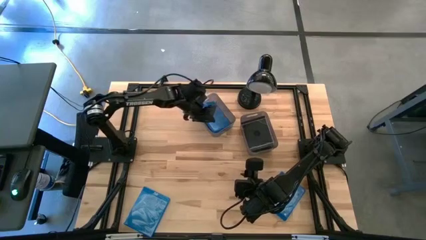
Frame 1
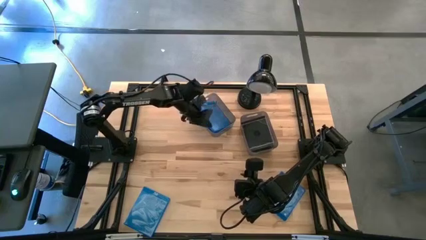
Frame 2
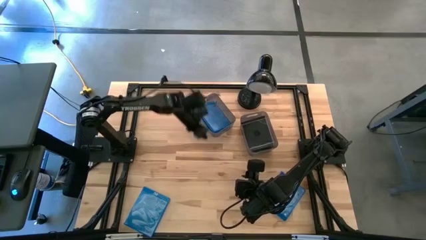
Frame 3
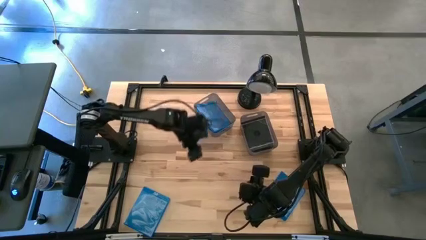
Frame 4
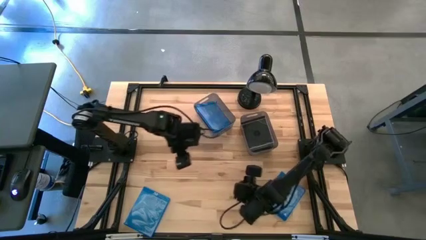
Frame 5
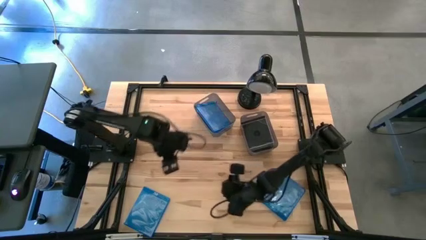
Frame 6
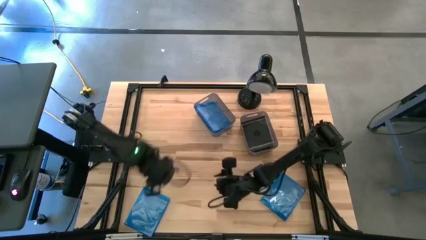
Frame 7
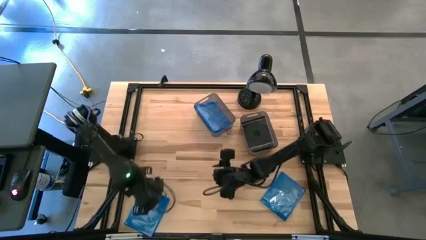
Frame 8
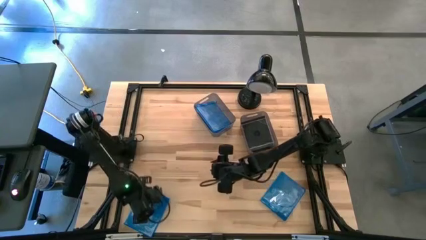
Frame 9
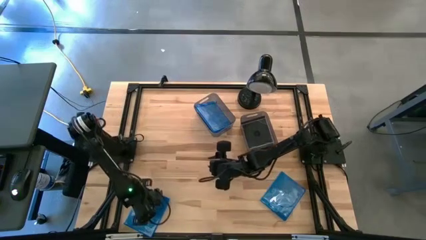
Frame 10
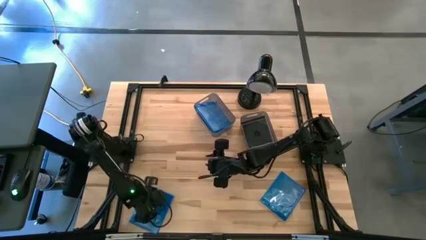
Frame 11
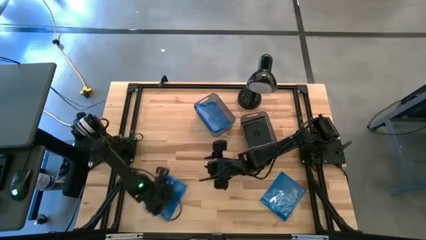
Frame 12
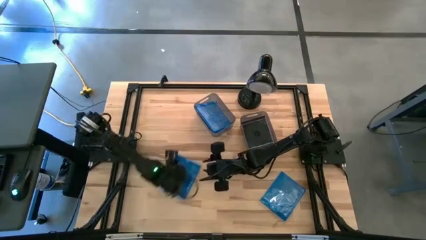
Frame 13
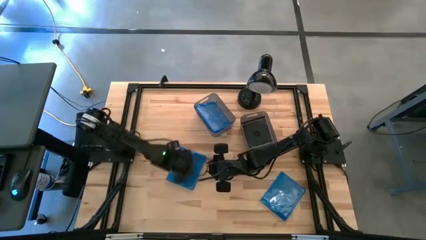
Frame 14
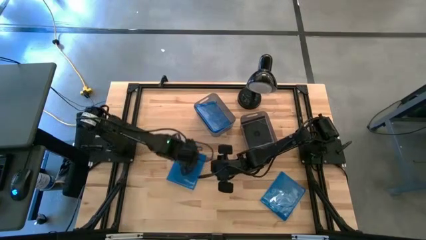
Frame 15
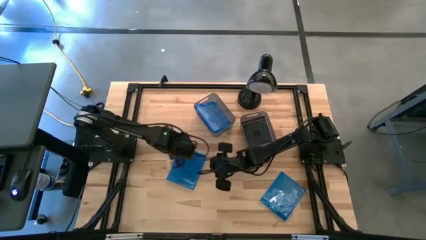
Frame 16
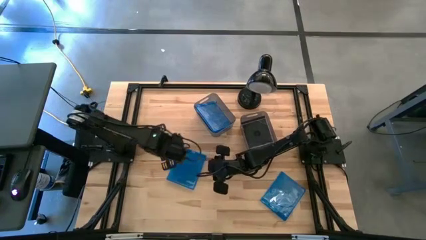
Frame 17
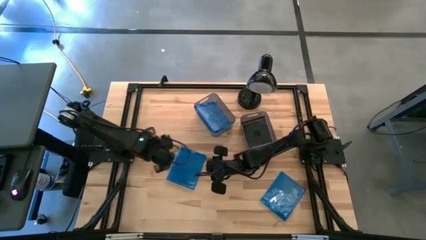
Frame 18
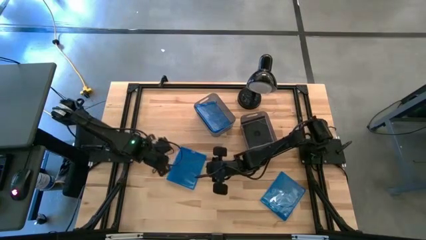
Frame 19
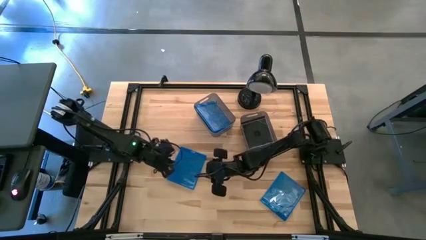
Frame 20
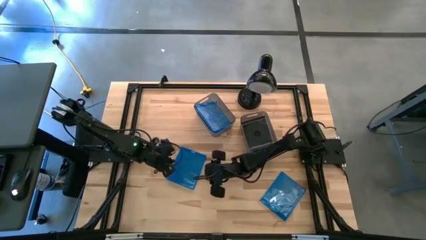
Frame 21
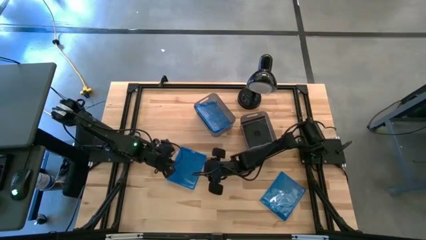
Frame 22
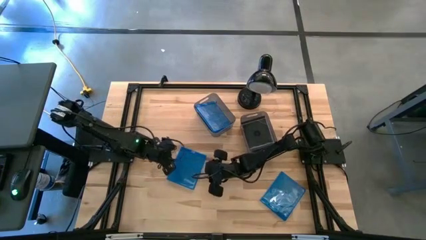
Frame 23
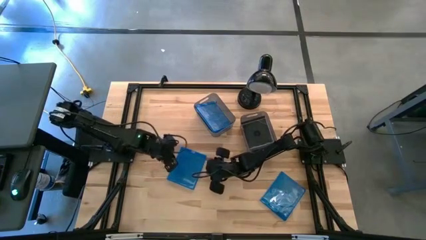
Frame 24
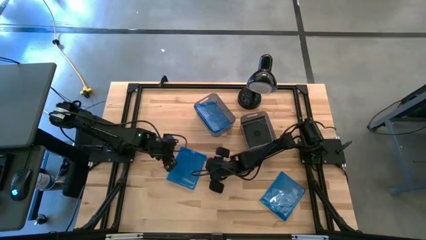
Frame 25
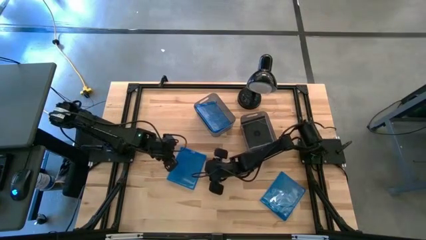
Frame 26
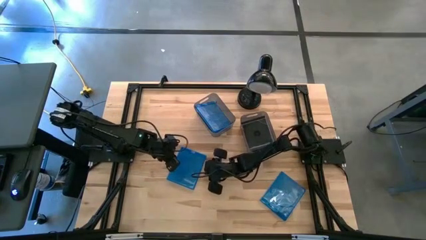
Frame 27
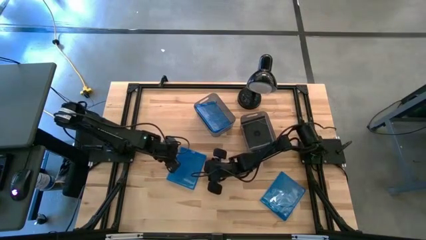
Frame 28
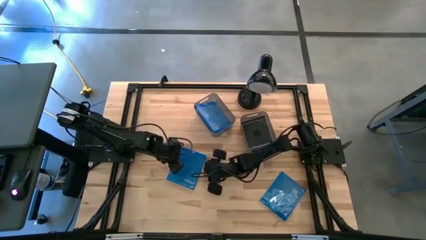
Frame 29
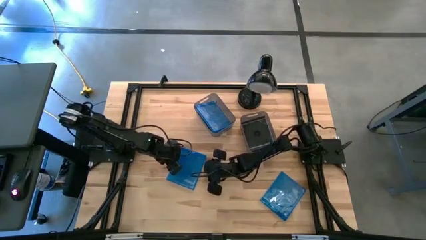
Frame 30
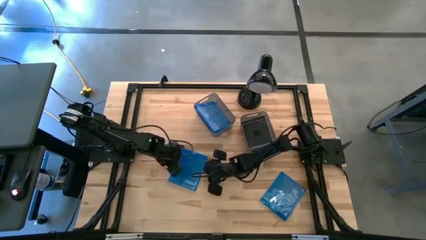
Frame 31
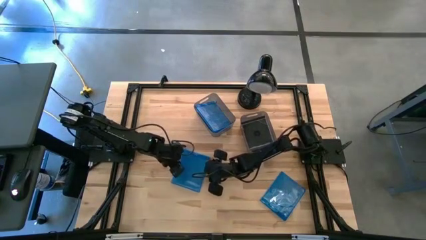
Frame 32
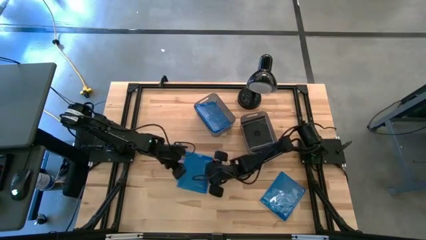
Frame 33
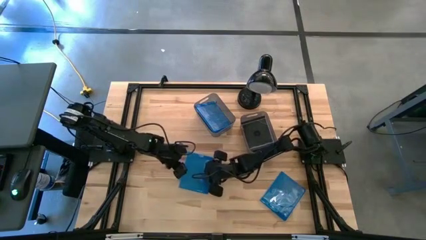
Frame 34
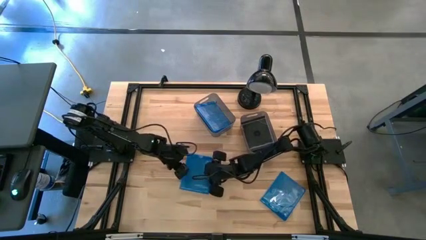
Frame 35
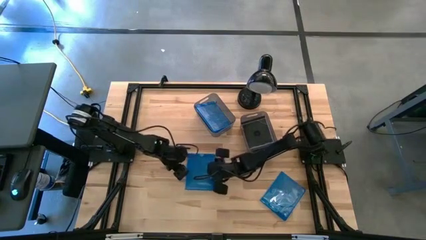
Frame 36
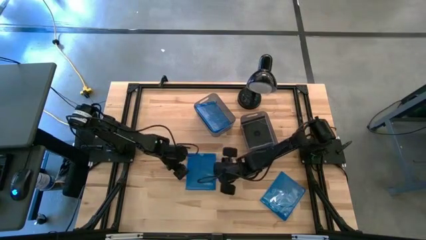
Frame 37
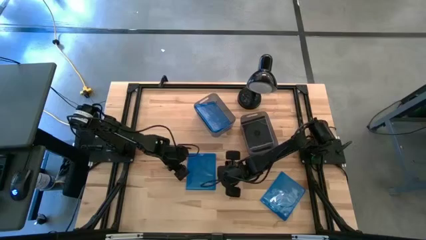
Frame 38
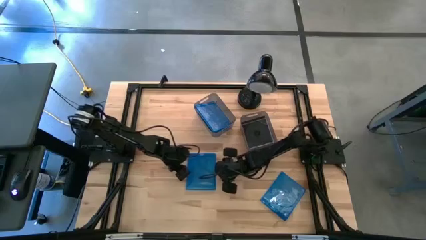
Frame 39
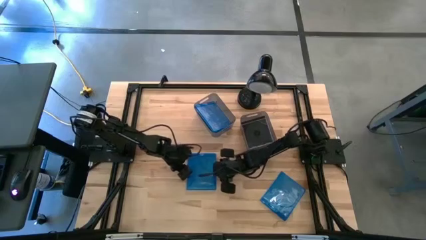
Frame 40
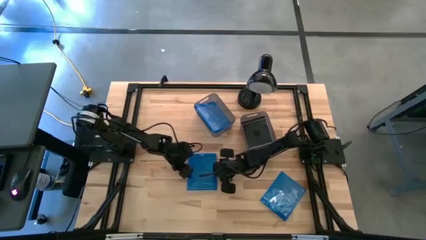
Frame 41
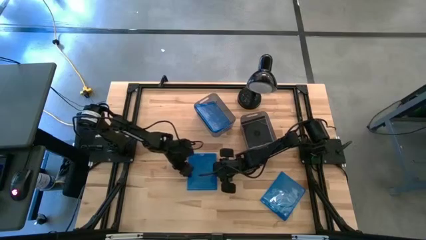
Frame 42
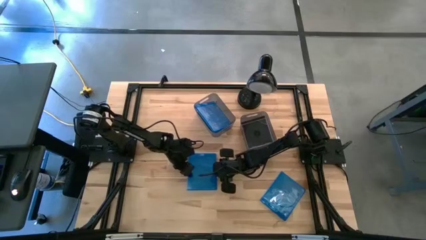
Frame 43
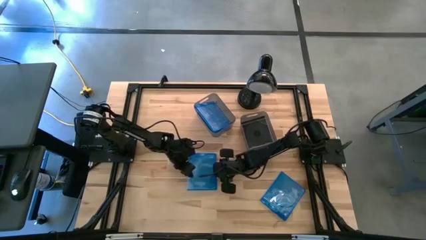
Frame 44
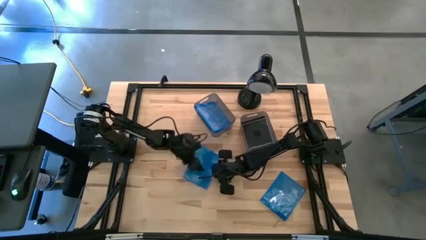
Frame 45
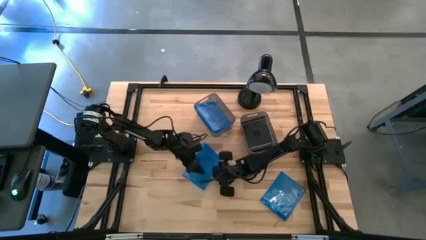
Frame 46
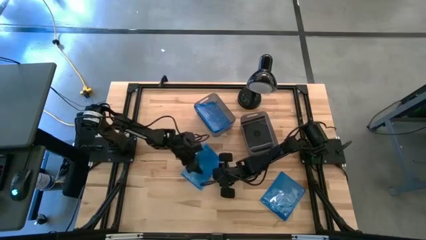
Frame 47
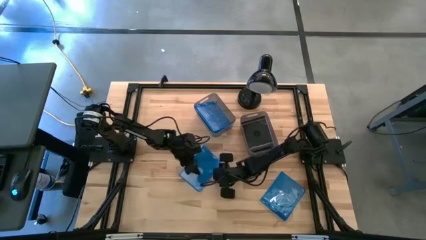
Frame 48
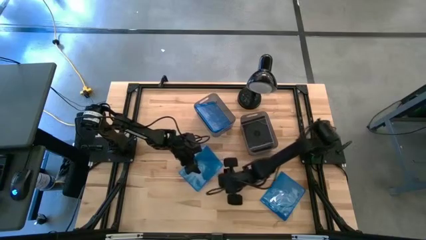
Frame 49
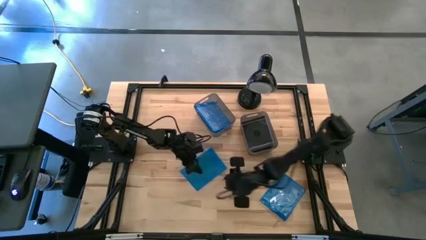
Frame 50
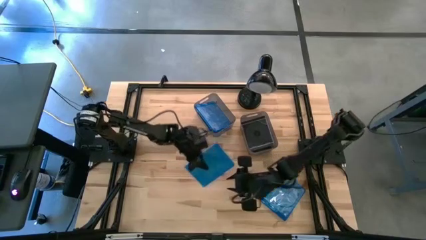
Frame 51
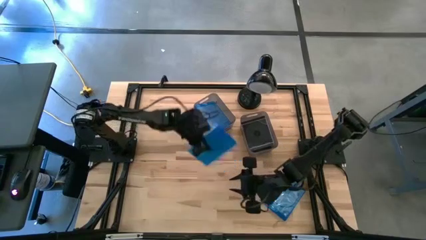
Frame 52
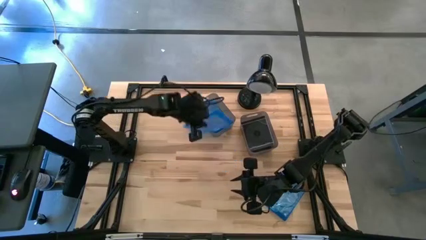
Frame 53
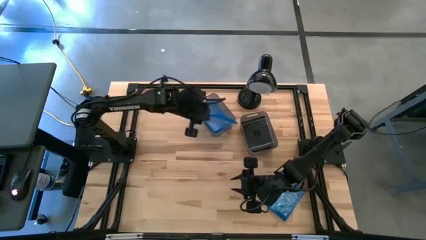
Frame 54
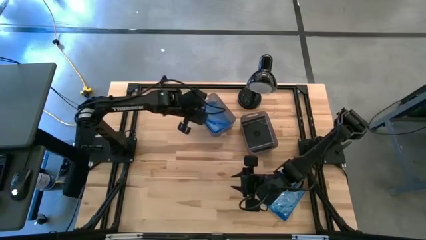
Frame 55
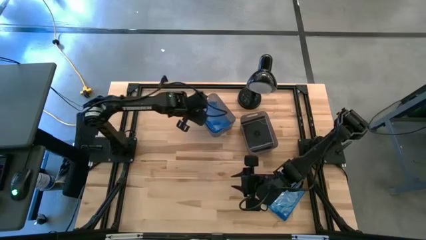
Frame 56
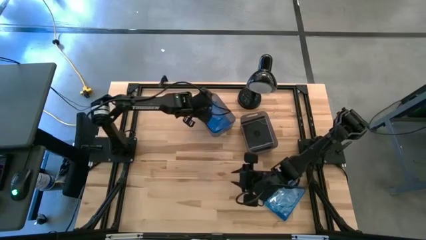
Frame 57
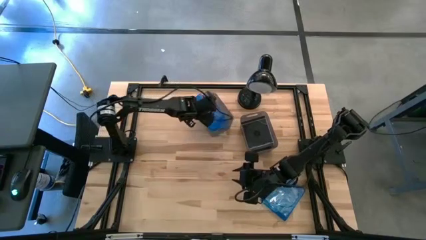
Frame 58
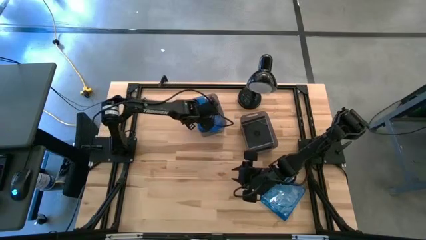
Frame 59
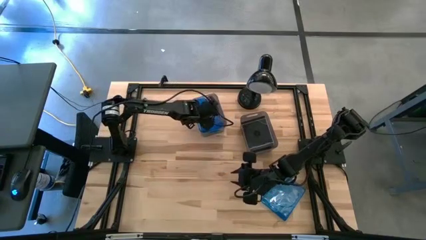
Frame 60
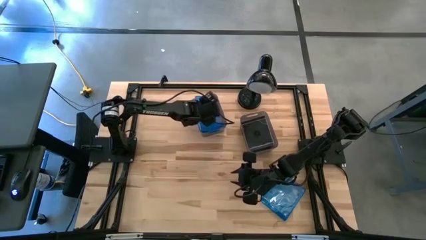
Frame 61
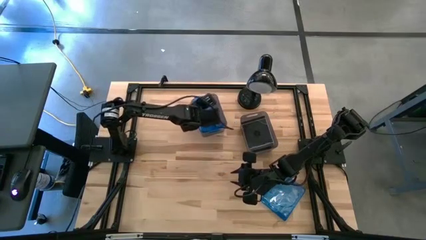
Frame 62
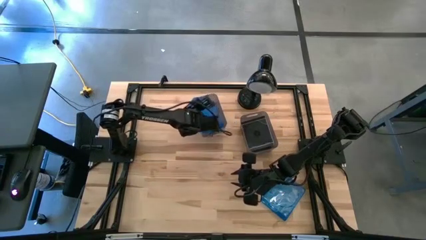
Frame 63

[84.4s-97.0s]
Task: Pick & place jewel cases by type
Put the left blue CD case into the left black bin
